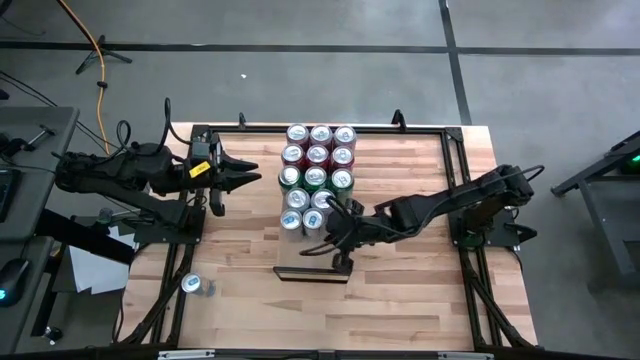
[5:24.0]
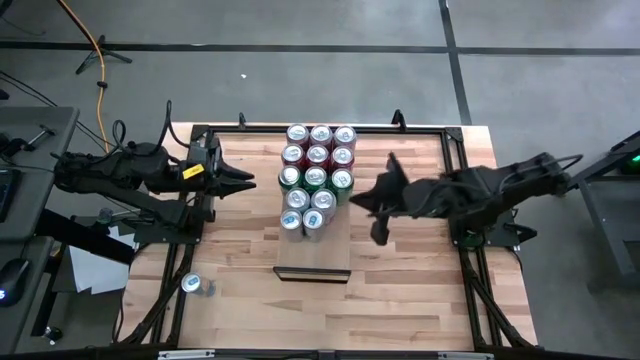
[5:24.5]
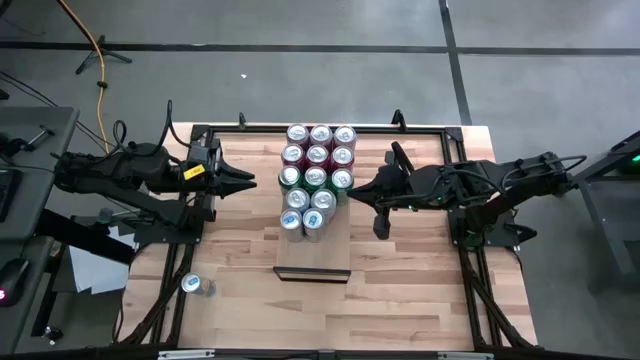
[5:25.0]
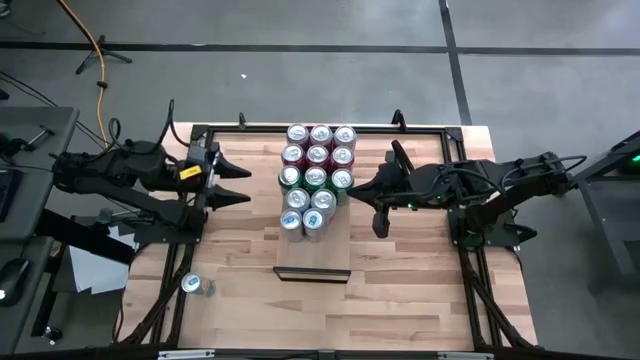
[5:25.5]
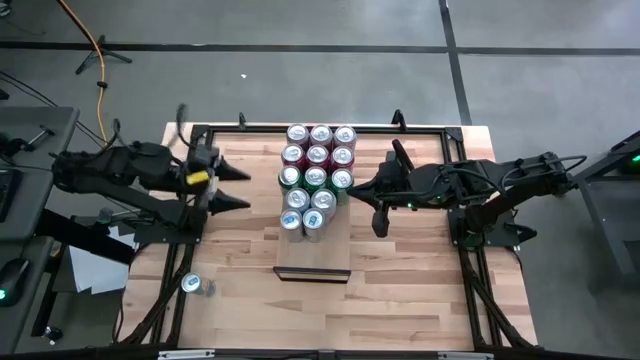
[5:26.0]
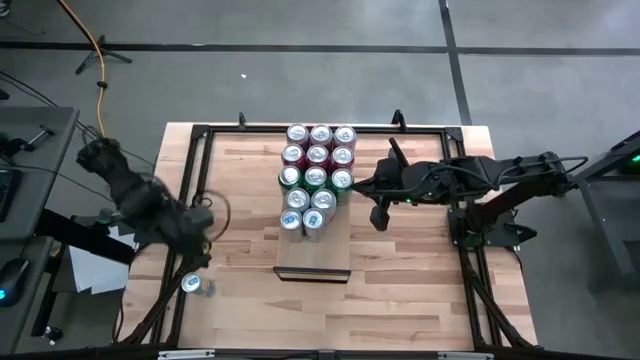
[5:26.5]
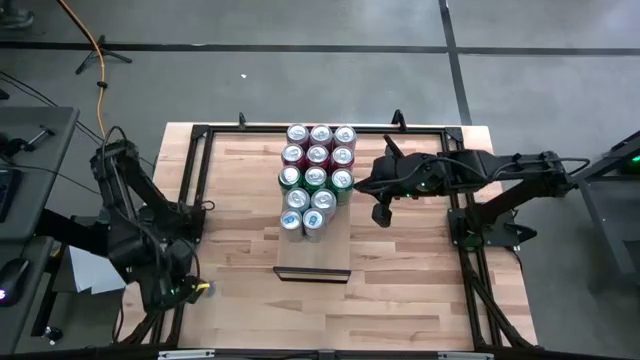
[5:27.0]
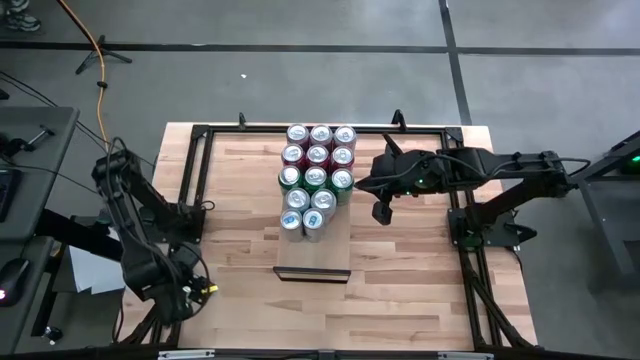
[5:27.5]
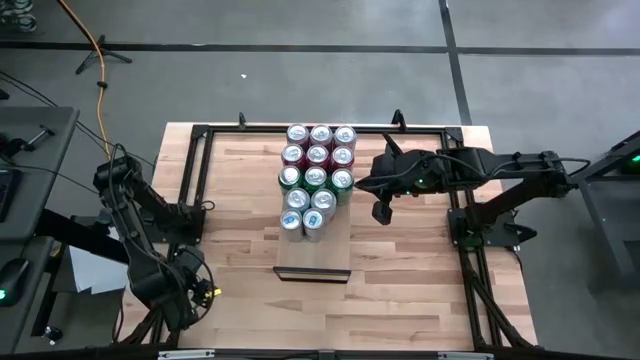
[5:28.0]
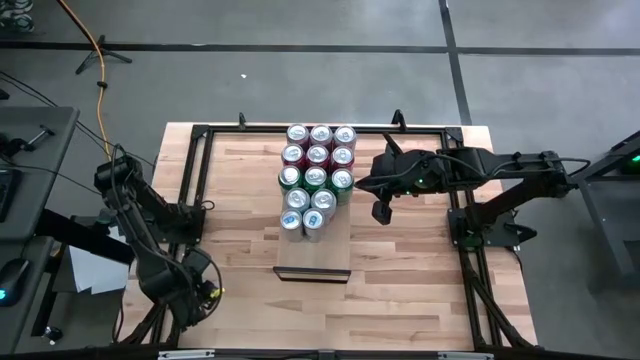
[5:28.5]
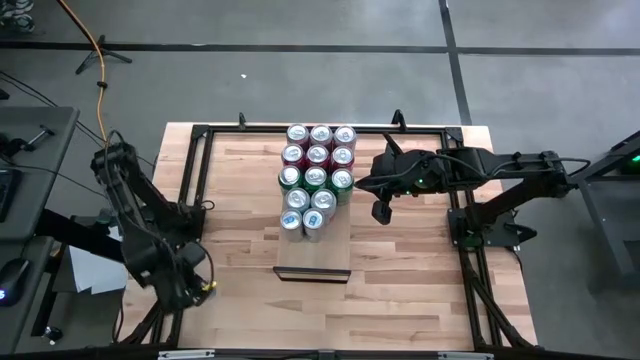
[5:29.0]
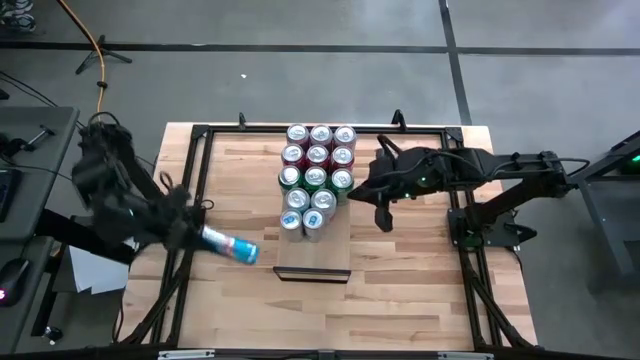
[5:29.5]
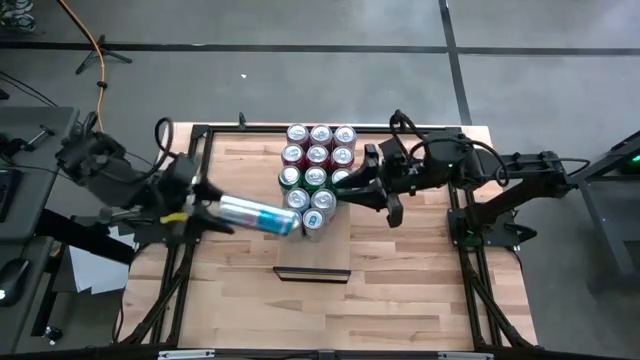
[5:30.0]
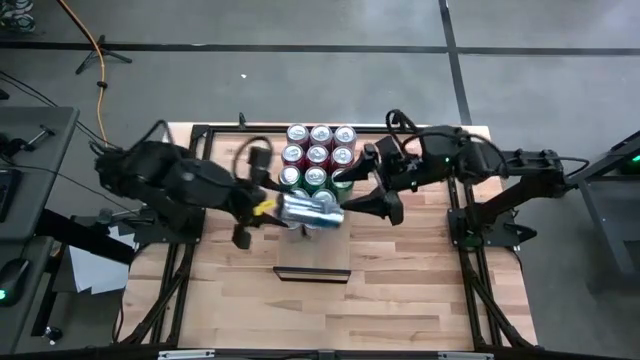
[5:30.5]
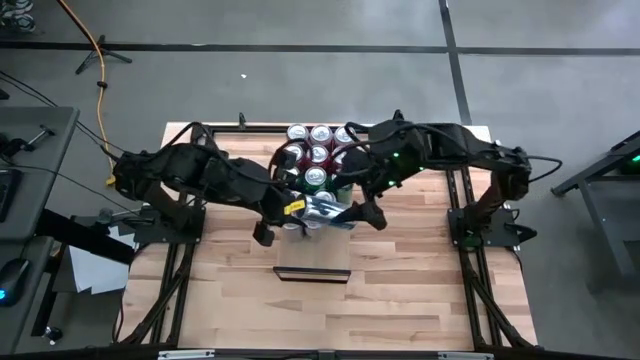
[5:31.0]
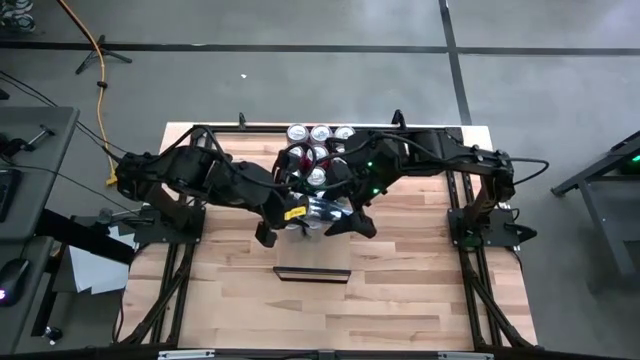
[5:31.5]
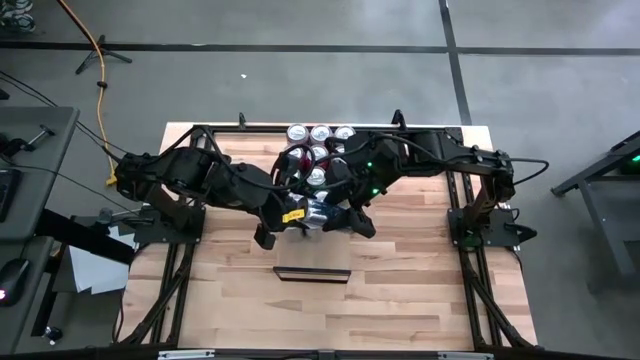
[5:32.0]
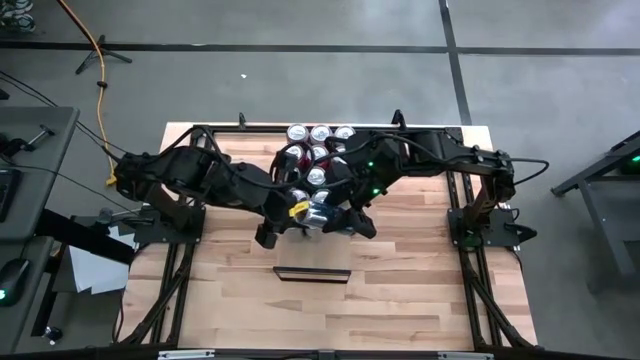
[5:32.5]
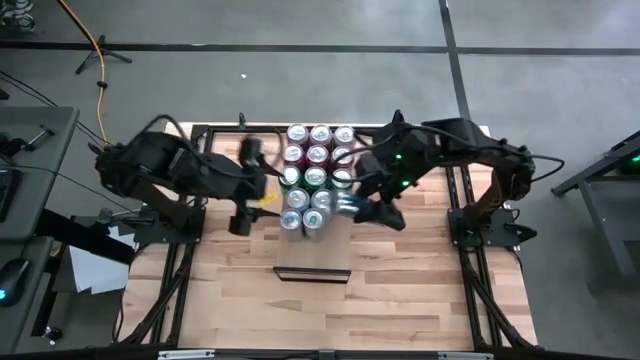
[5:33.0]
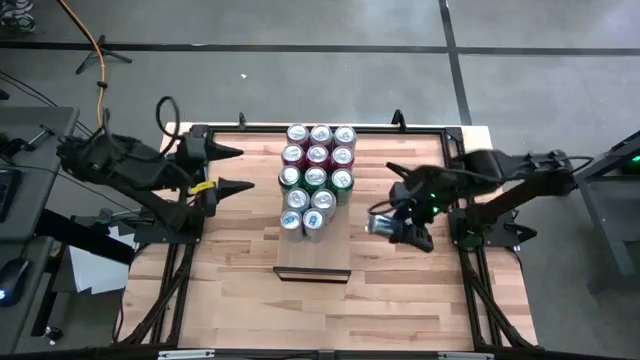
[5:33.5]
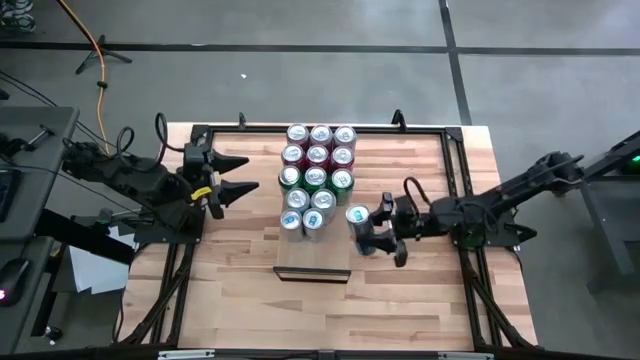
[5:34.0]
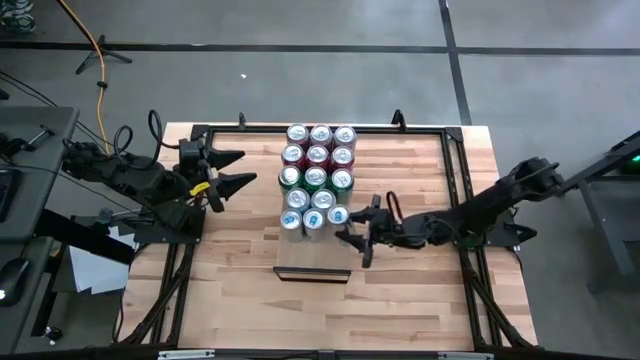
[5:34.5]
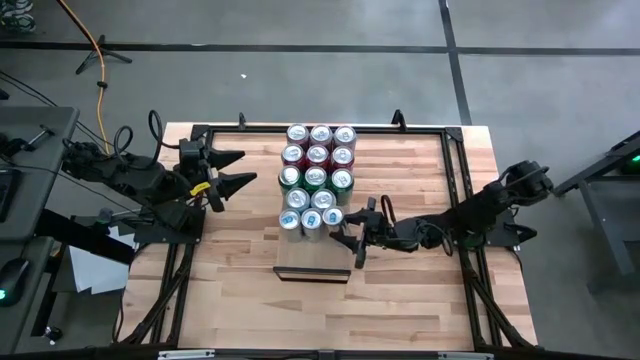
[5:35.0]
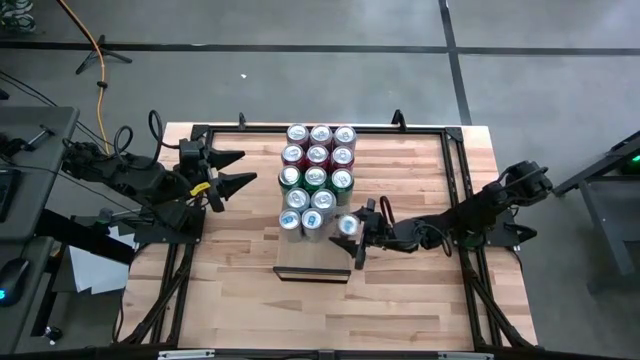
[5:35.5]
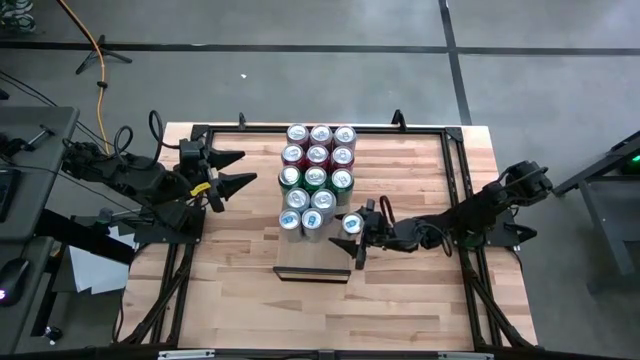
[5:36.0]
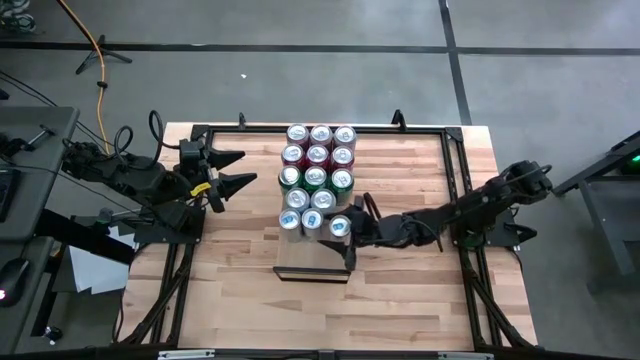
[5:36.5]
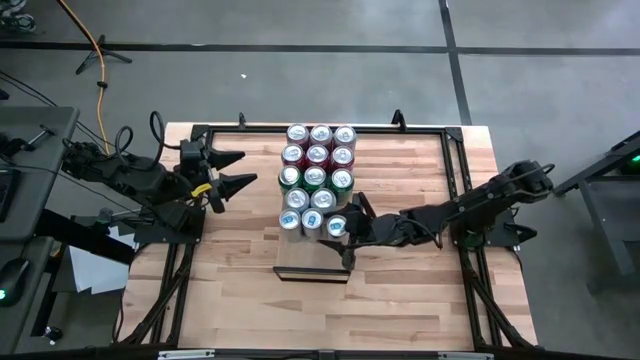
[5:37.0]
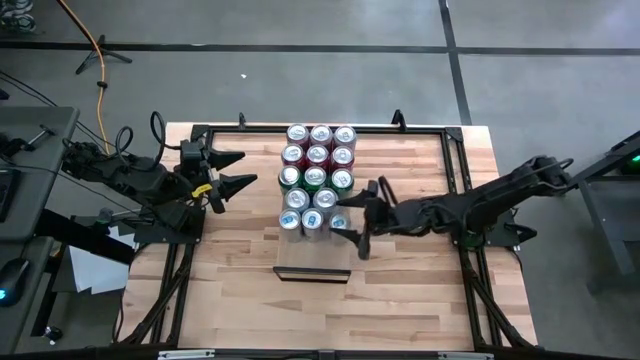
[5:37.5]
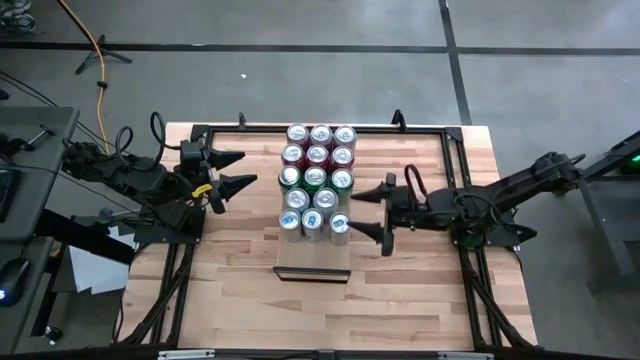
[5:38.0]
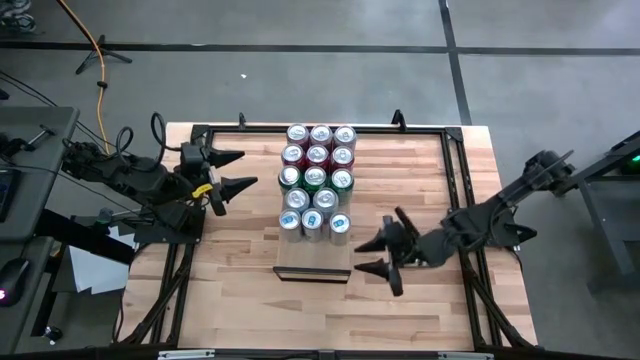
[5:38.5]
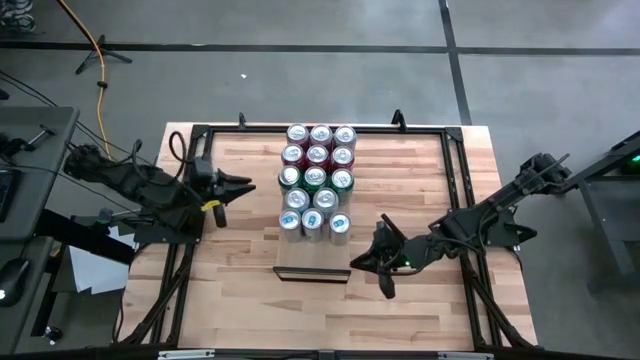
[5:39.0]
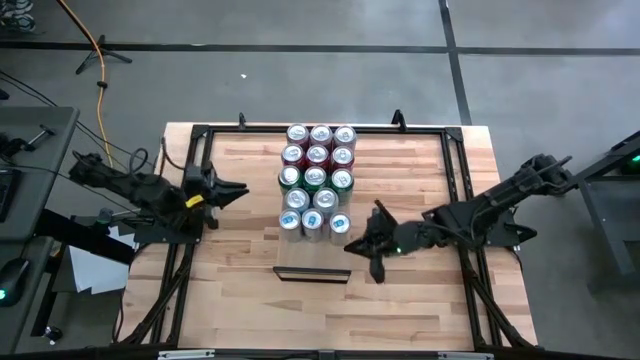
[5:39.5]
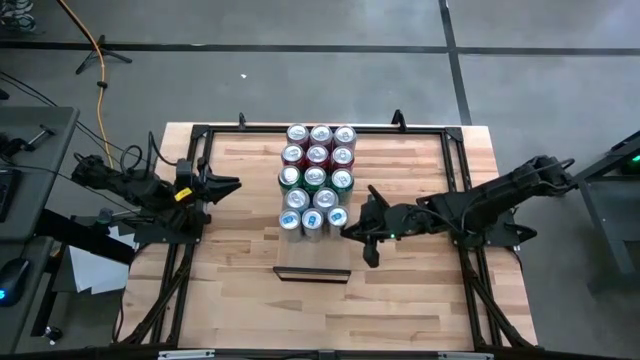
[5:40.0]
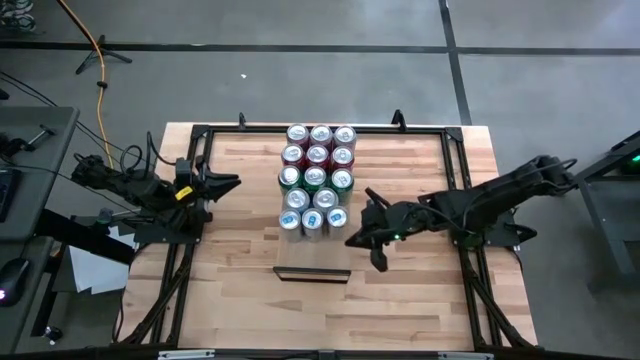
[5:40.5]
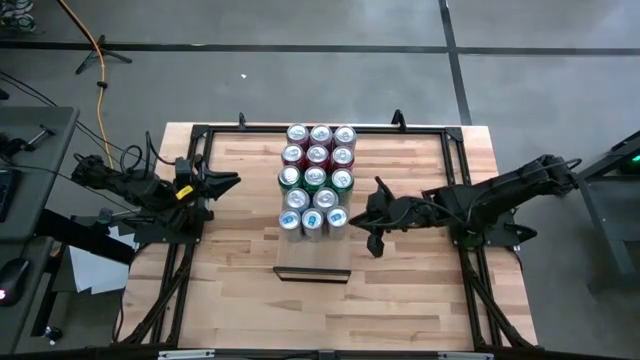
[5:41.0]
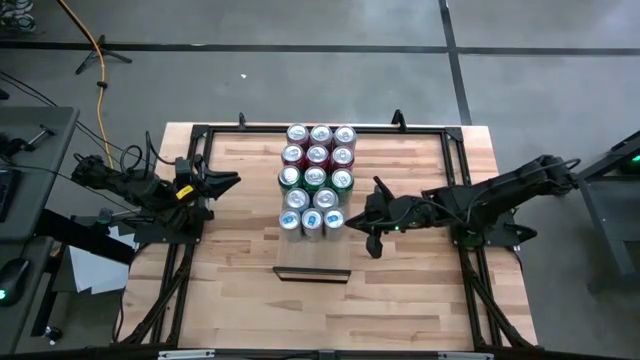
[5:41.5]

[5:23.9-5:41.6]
Task: Place canned beverage on shelf
Put the blue soda can on the shelf
